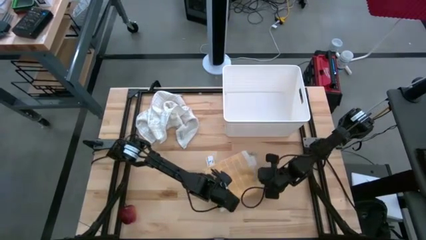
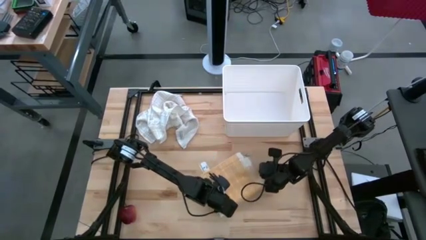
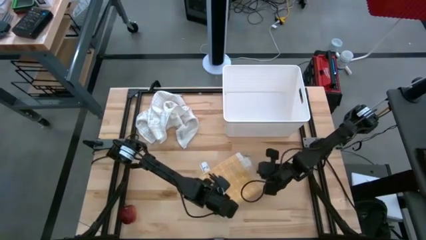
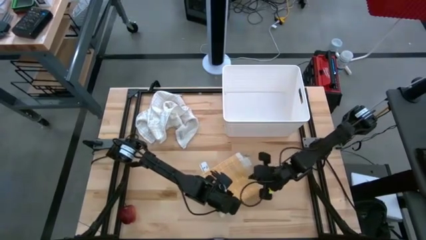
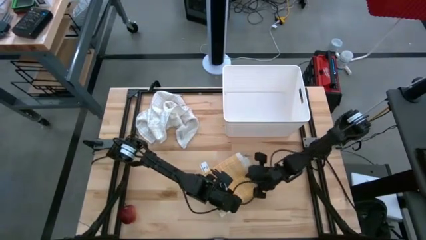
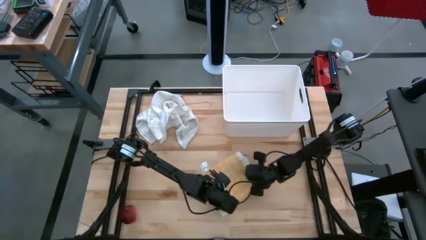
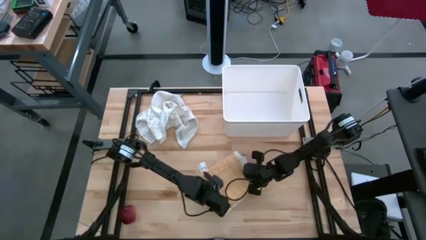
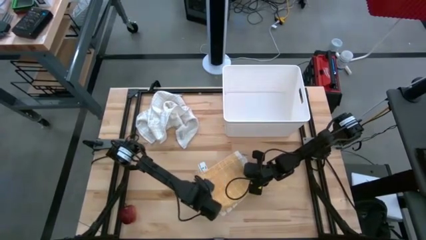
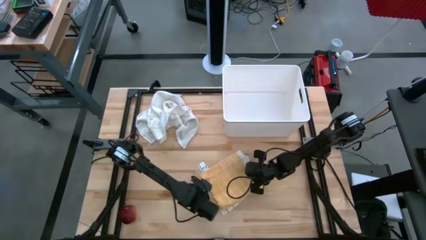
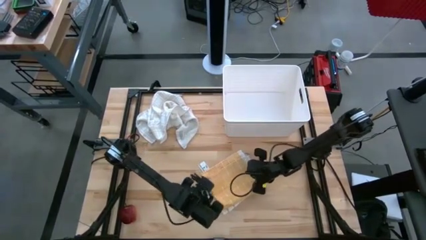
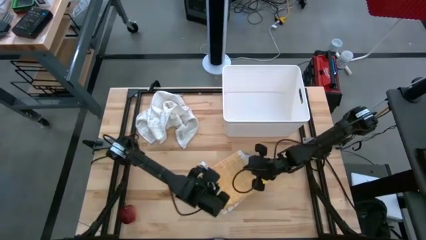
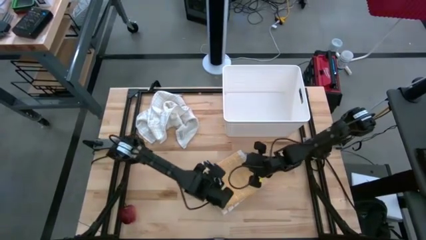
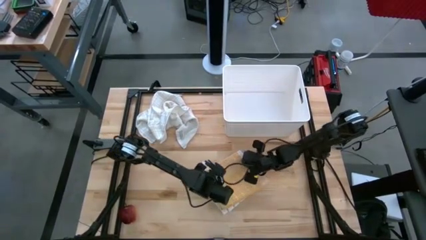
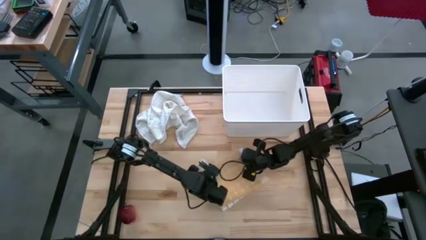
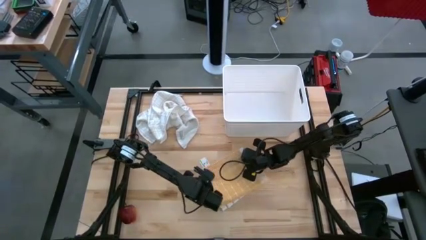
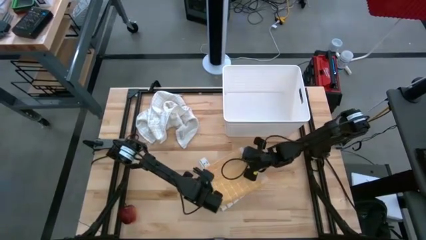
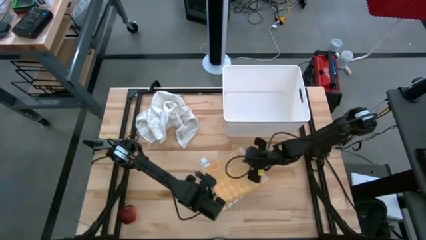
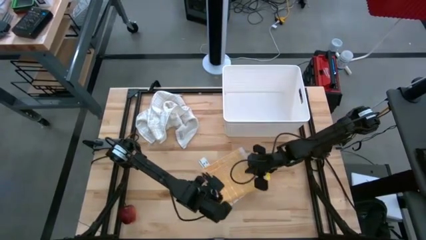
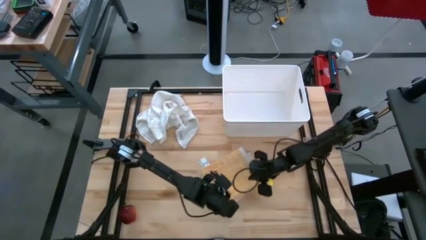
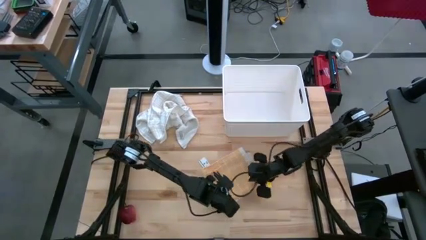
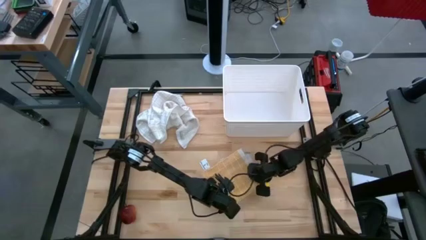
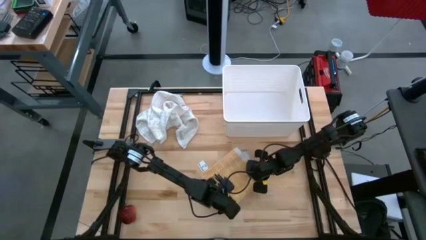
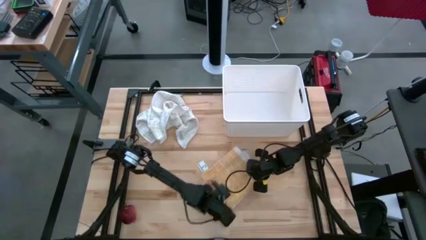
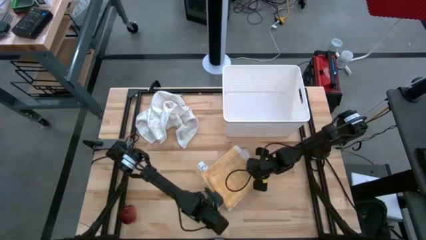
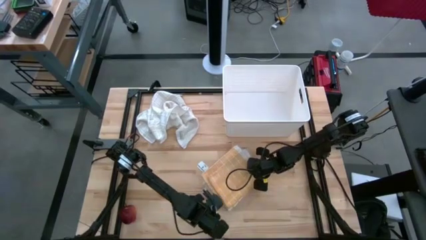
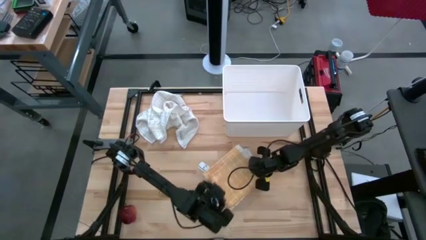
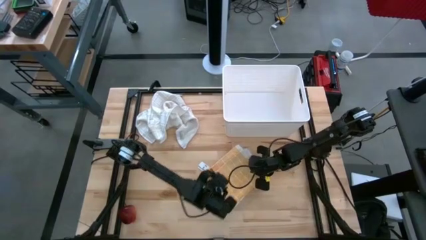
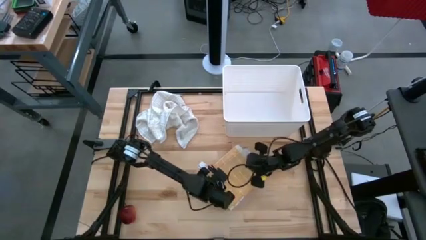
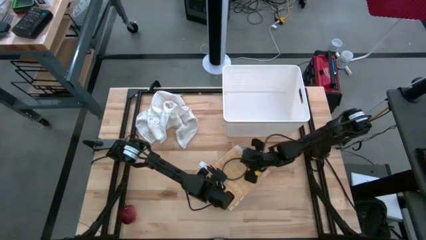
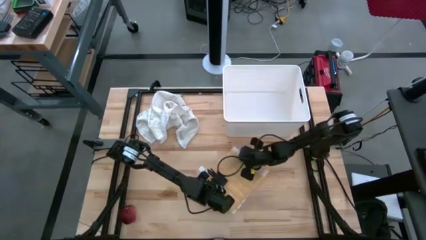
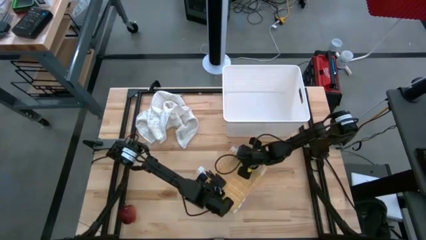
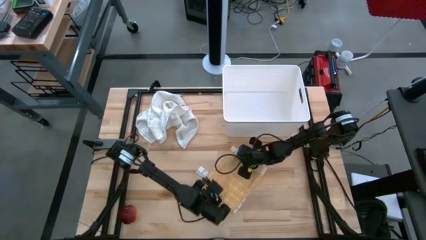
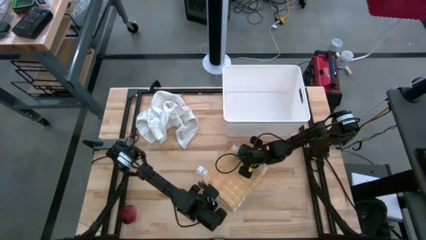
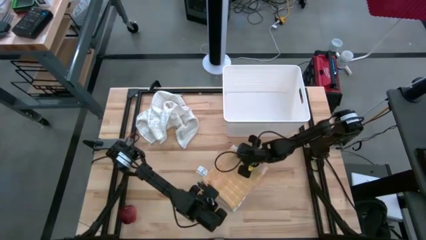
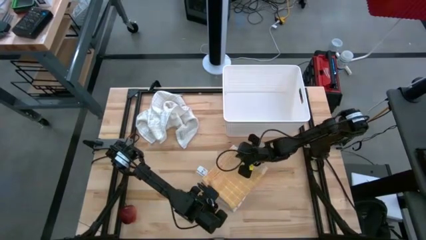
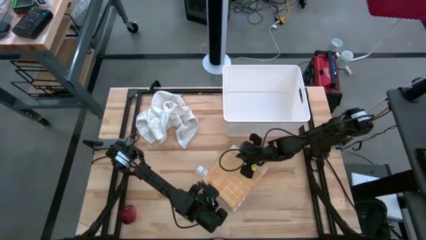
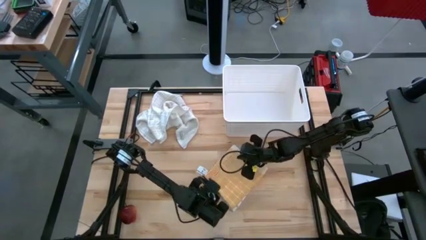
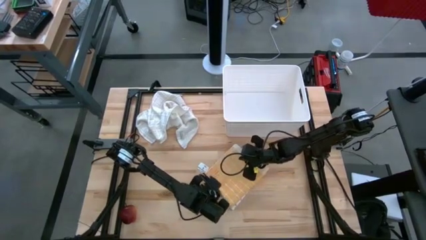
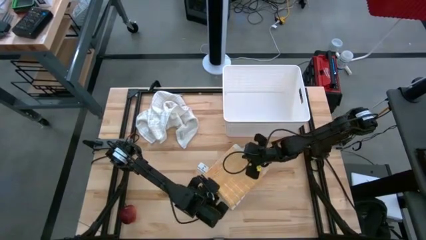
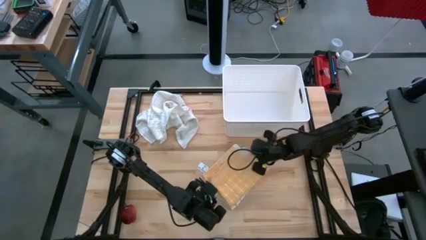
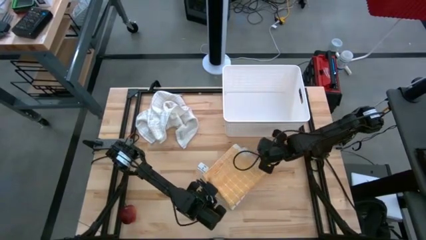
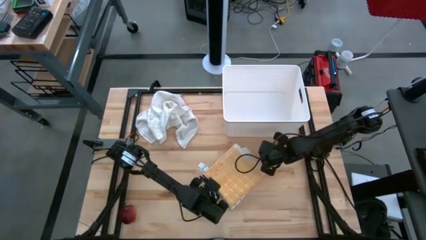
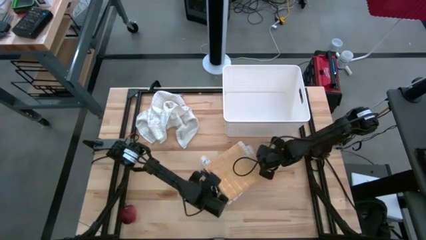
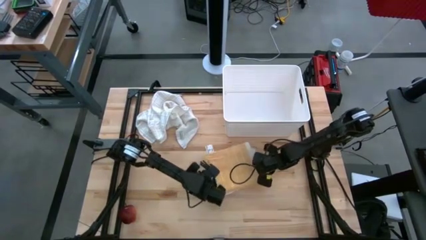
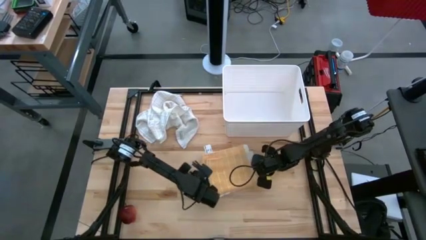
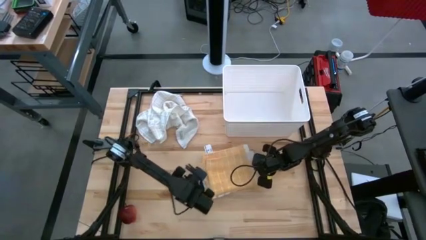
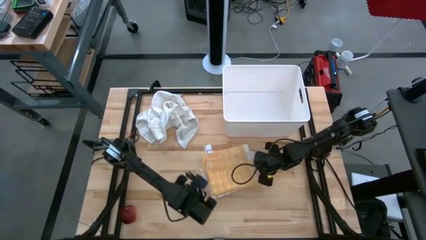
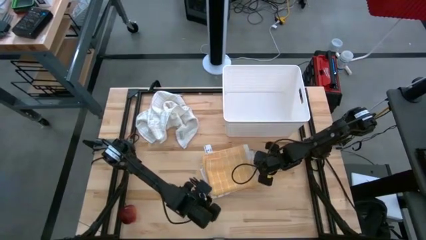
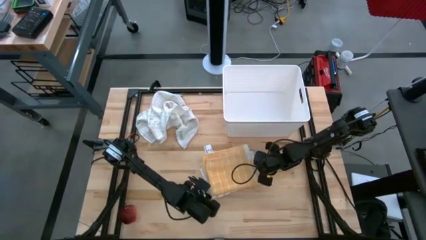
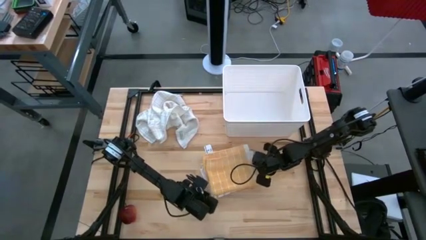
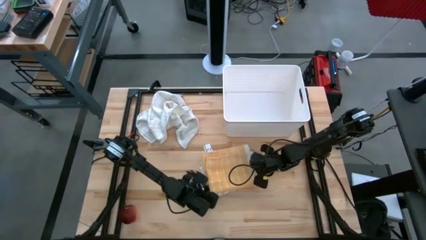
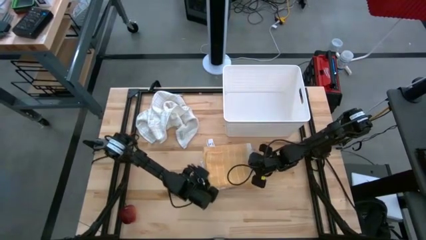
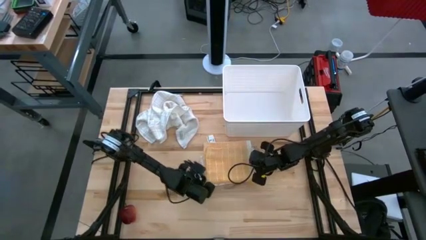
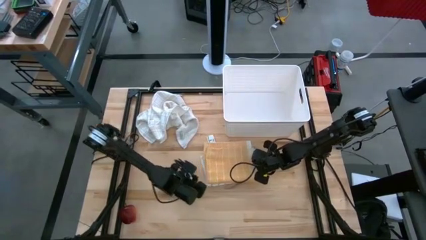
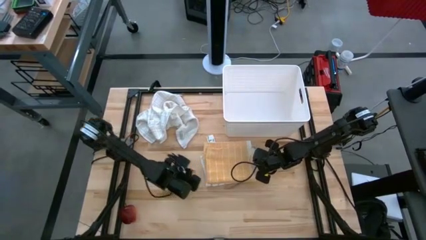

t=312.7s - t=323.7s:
Task: Fold towel
Stack the yellow squared towel on top of the white striped towel

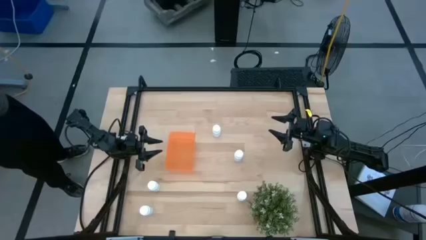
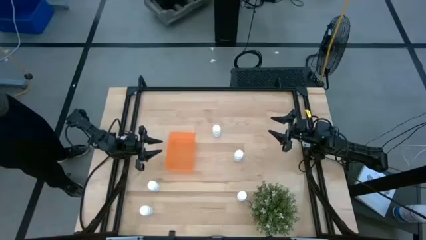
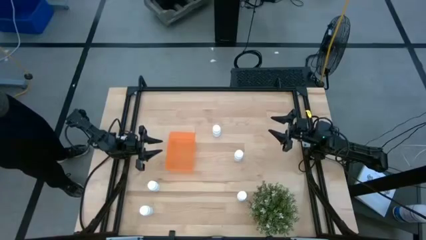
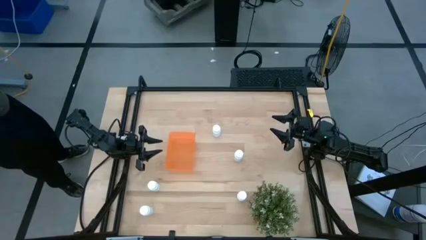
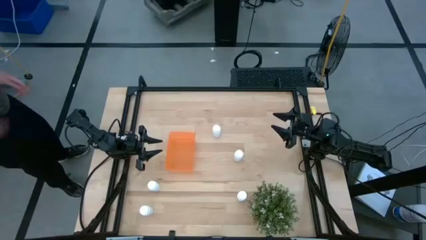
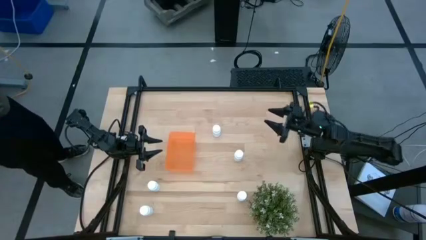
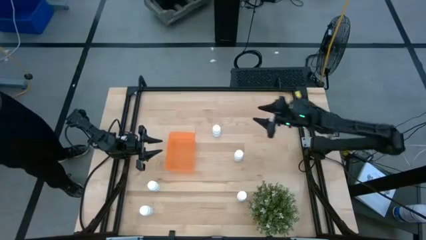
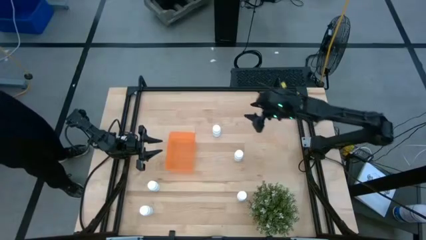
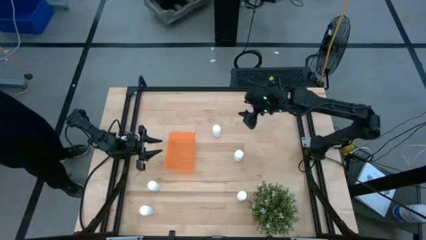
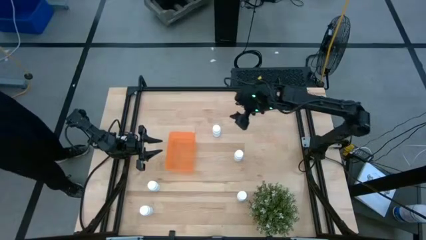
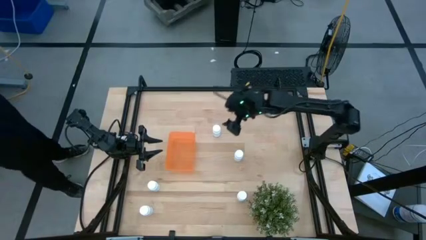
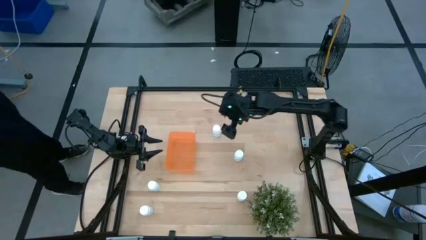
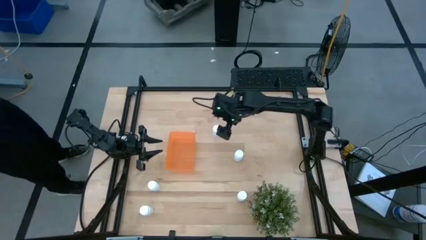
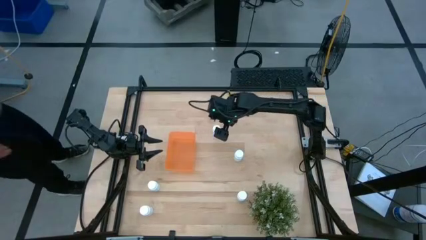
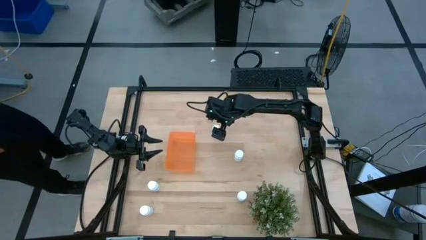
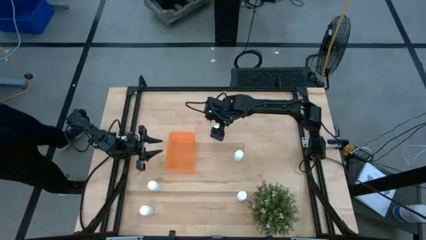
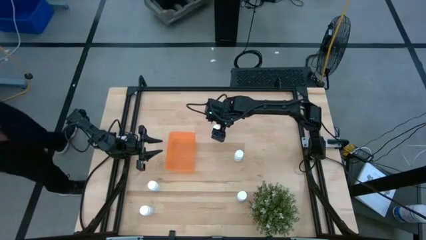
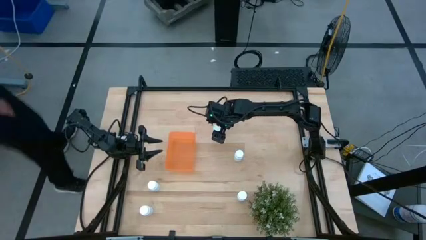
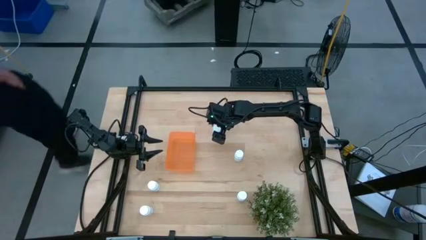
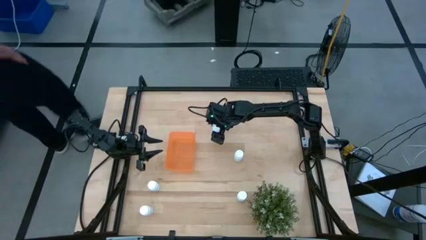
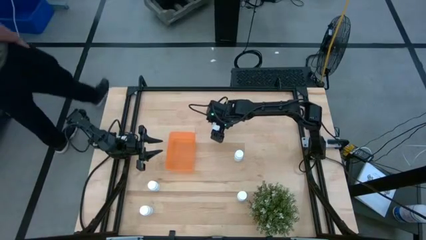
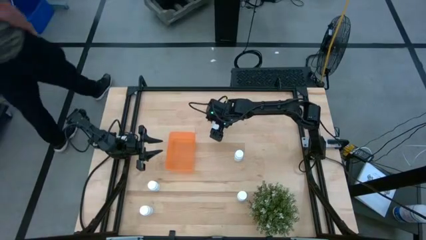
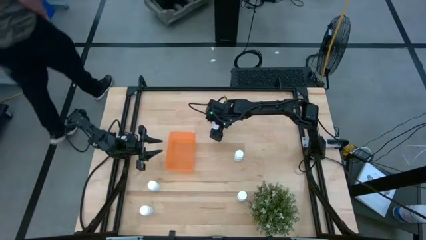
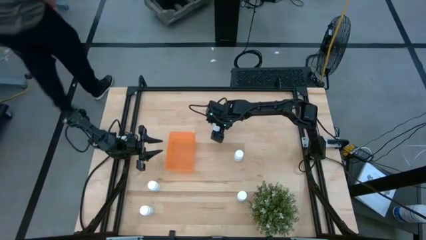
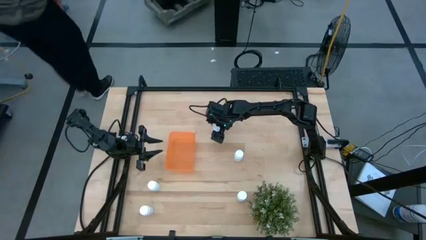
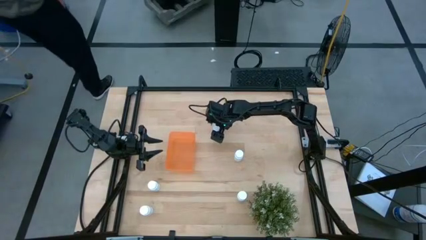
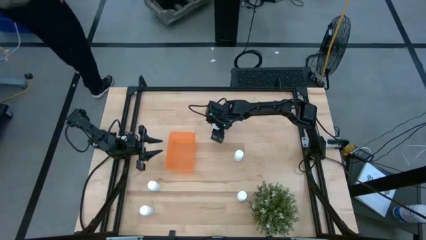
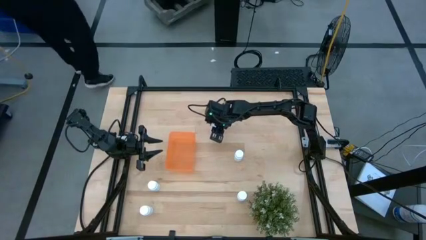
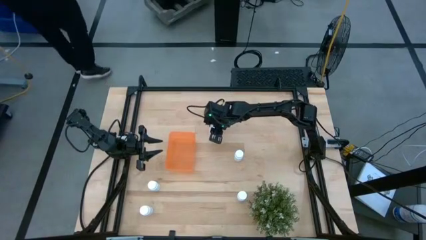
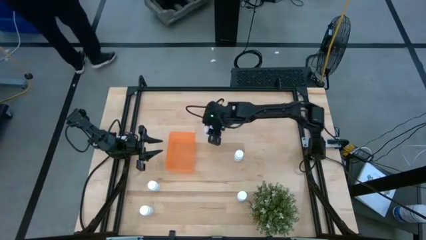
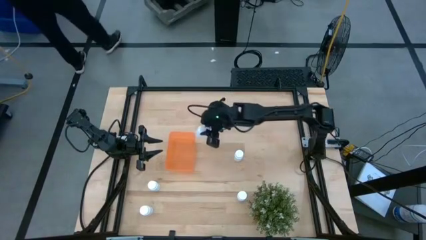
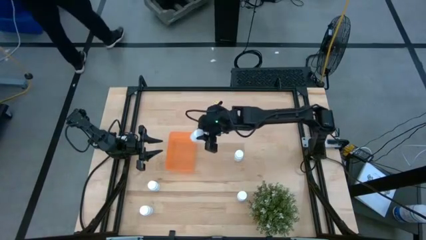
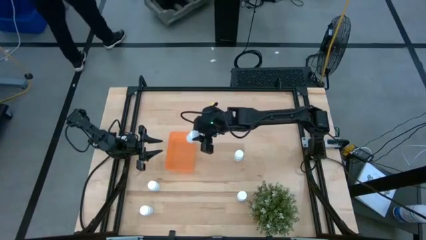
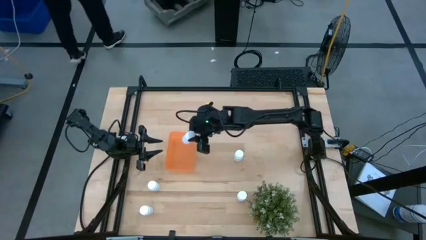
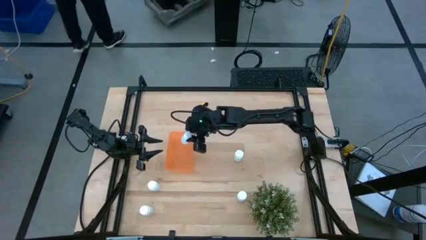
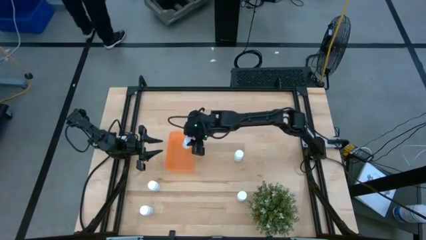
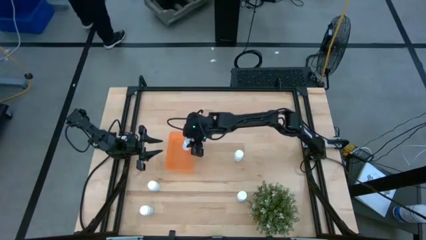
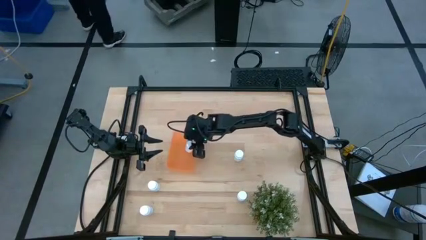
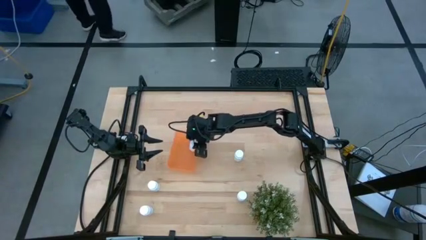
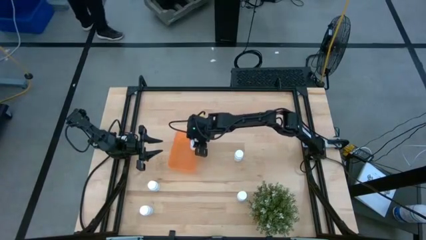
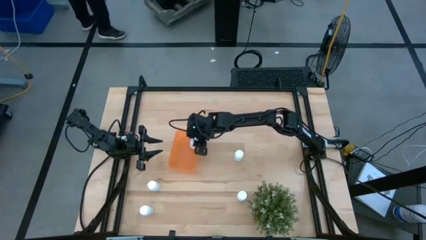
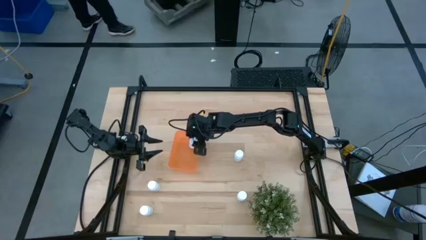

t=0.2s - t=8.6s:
Task: Pick and place pill bottles into a basket
Put the white medicine bottle into the orange bin
